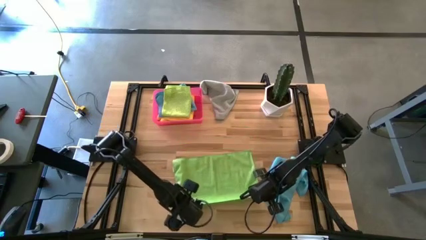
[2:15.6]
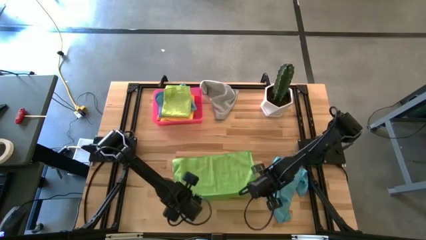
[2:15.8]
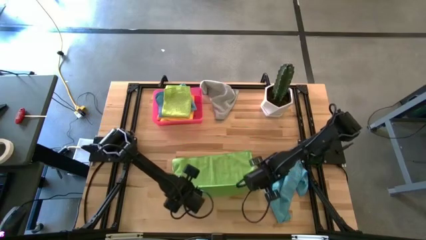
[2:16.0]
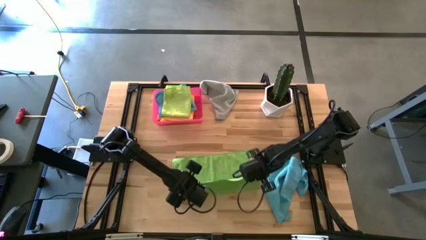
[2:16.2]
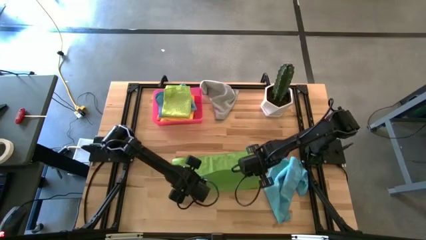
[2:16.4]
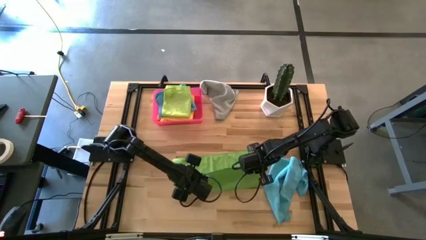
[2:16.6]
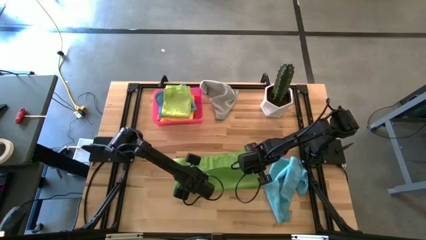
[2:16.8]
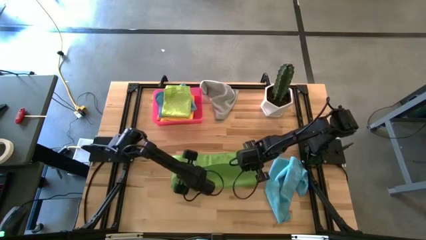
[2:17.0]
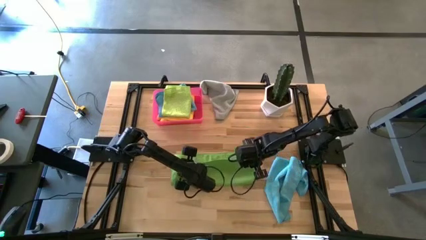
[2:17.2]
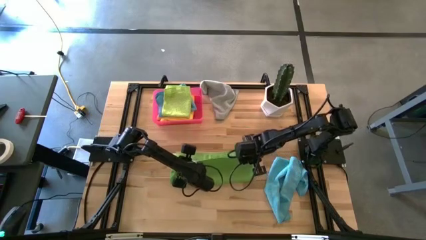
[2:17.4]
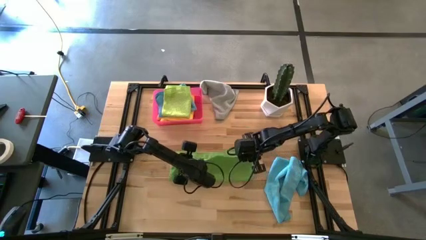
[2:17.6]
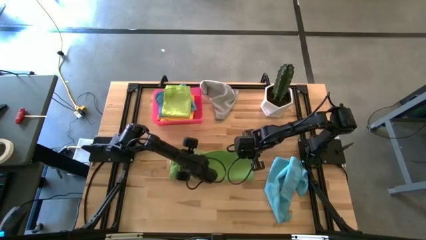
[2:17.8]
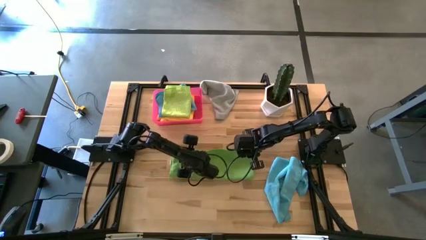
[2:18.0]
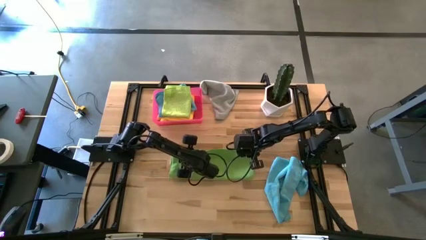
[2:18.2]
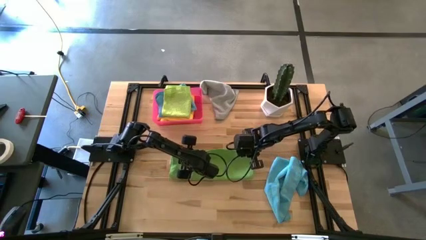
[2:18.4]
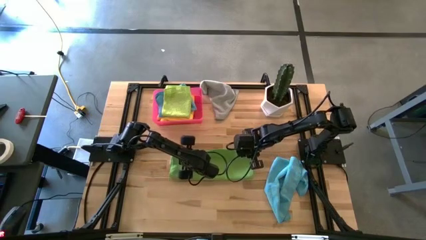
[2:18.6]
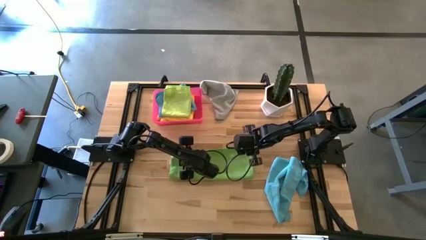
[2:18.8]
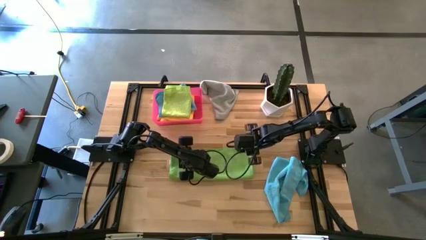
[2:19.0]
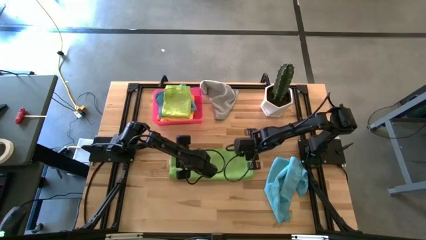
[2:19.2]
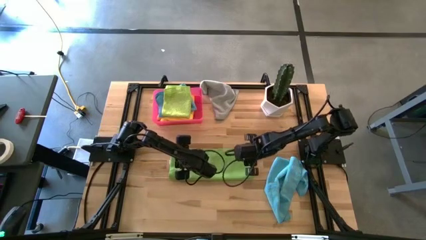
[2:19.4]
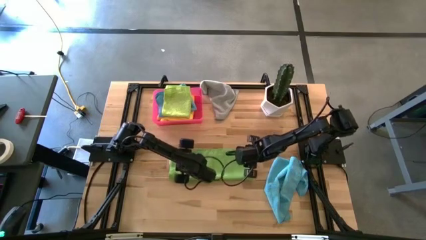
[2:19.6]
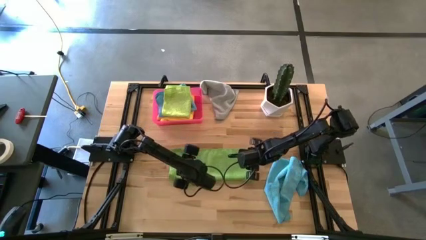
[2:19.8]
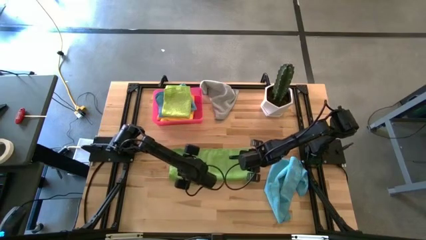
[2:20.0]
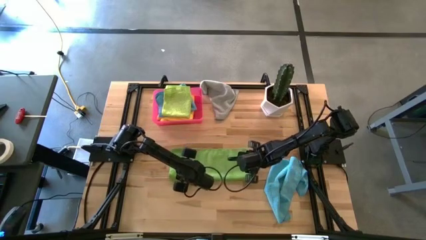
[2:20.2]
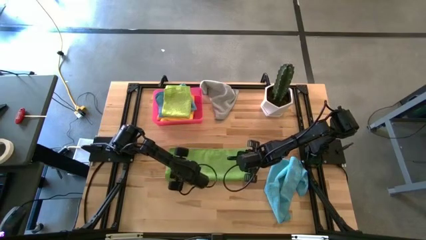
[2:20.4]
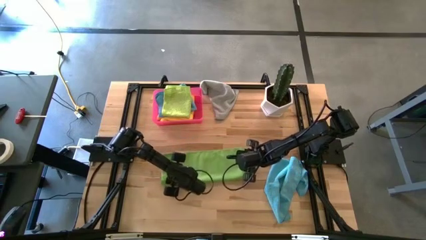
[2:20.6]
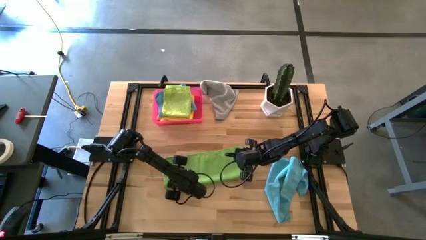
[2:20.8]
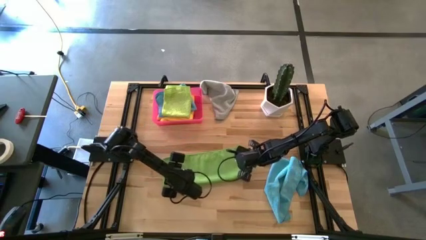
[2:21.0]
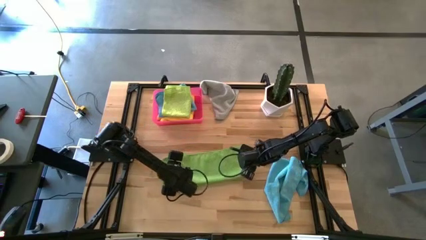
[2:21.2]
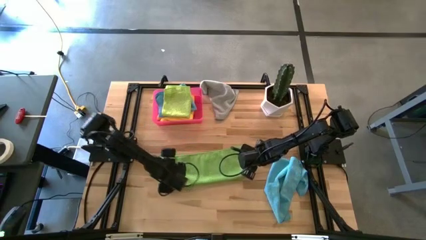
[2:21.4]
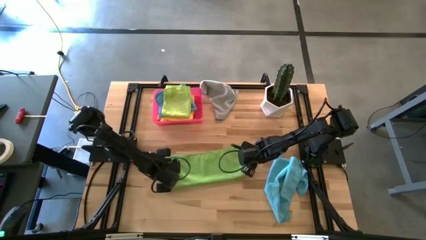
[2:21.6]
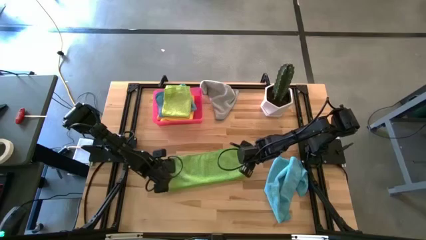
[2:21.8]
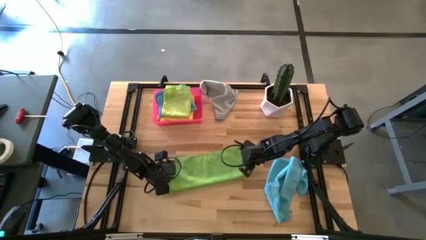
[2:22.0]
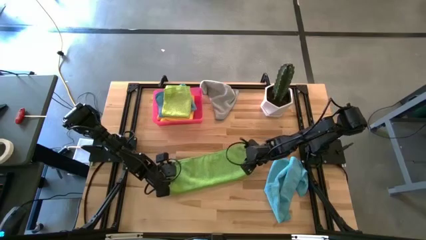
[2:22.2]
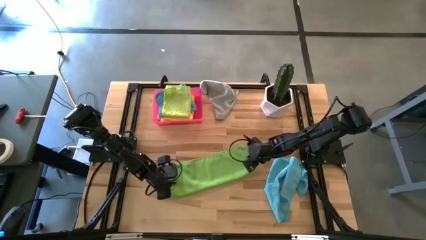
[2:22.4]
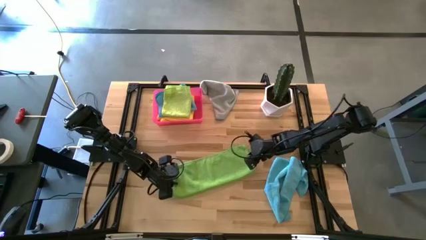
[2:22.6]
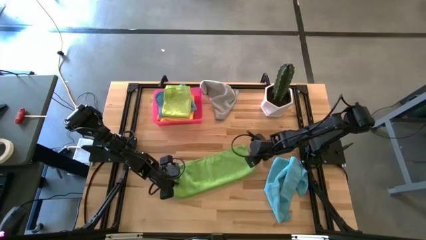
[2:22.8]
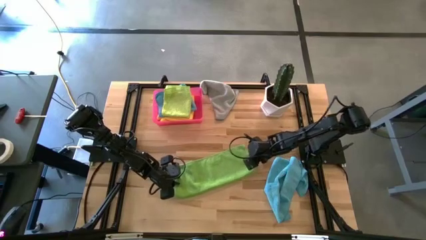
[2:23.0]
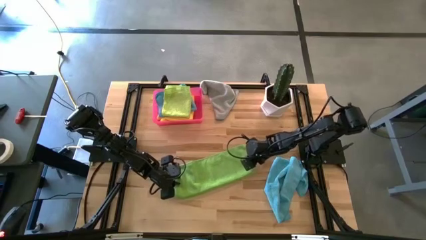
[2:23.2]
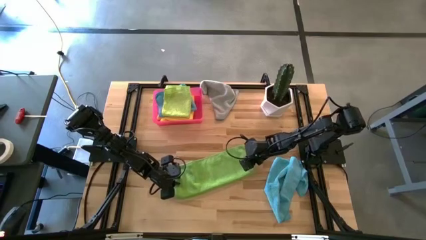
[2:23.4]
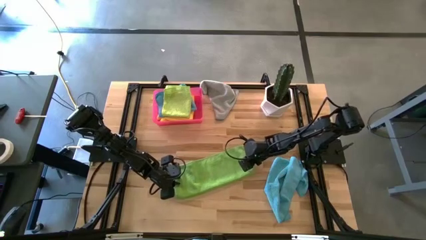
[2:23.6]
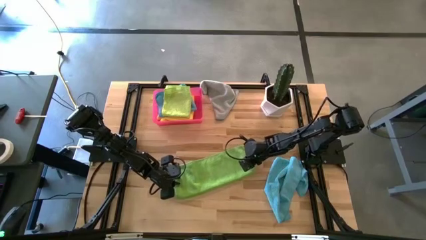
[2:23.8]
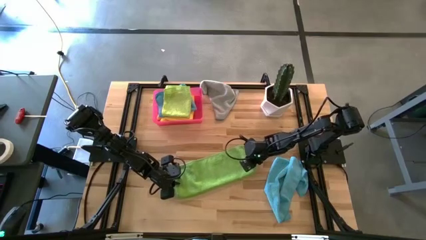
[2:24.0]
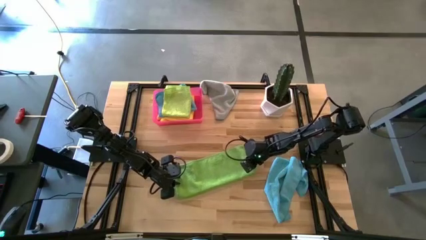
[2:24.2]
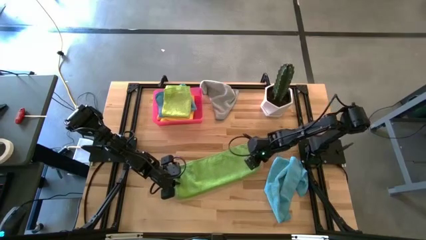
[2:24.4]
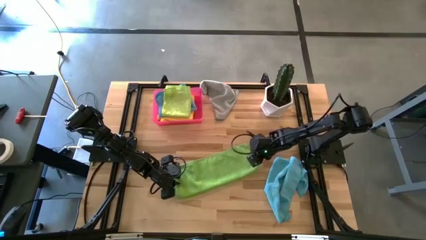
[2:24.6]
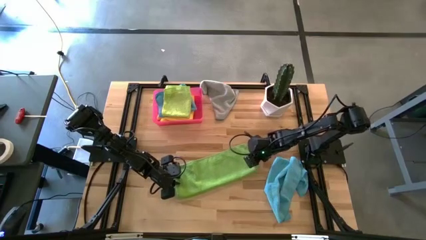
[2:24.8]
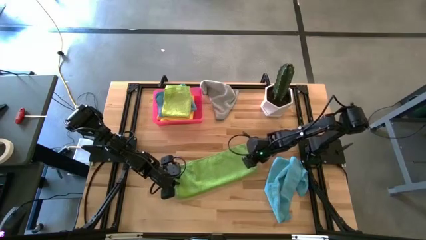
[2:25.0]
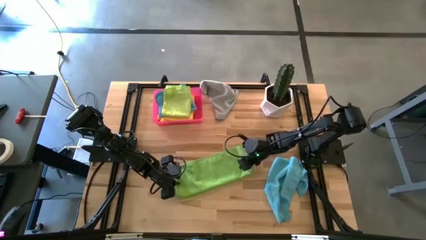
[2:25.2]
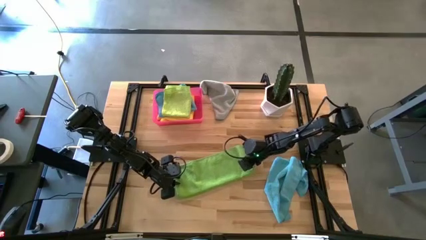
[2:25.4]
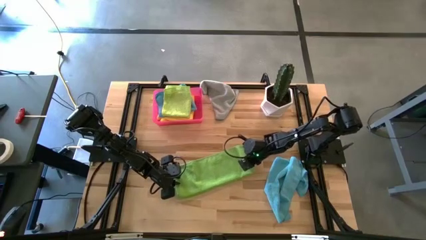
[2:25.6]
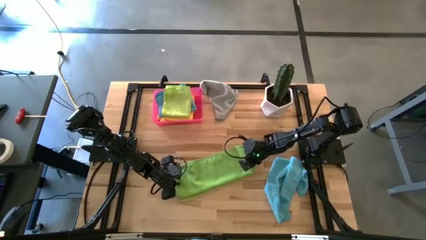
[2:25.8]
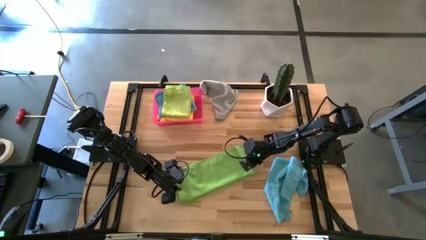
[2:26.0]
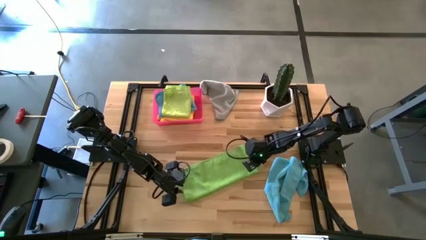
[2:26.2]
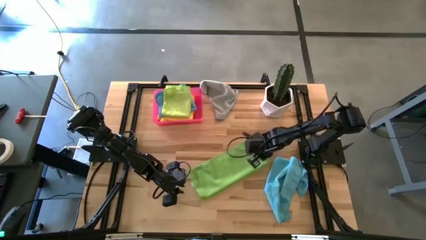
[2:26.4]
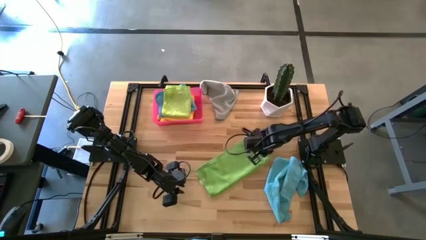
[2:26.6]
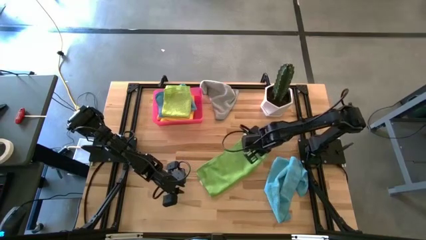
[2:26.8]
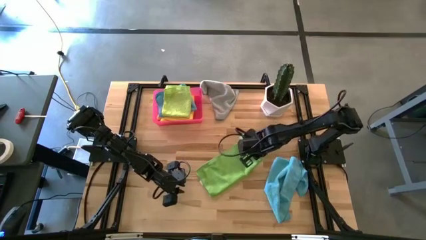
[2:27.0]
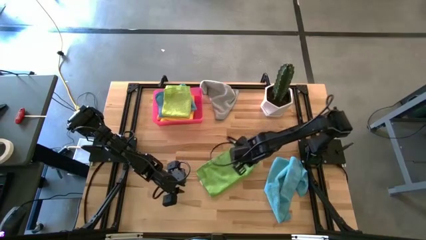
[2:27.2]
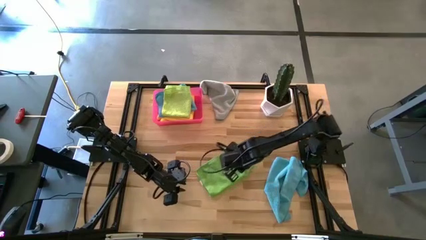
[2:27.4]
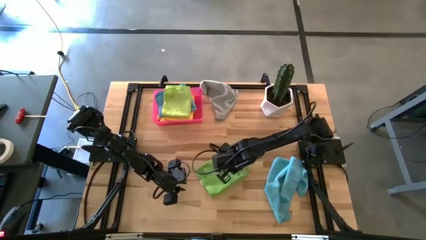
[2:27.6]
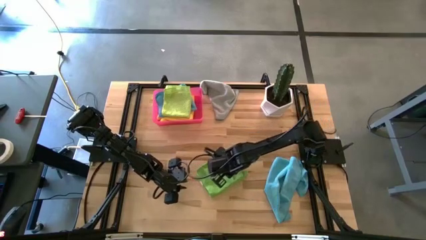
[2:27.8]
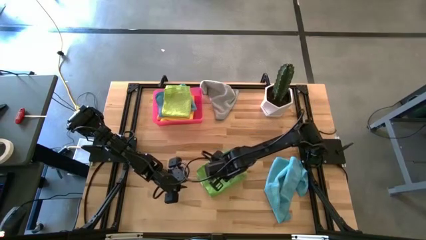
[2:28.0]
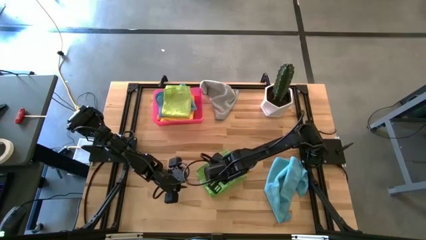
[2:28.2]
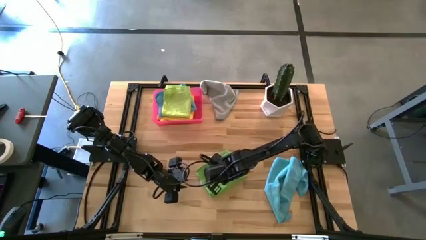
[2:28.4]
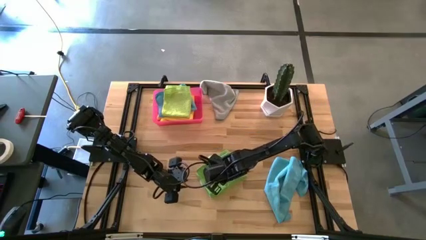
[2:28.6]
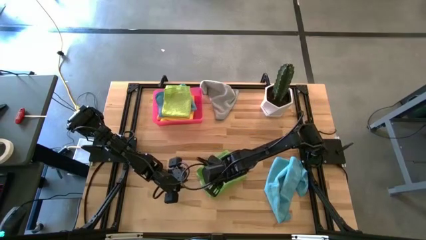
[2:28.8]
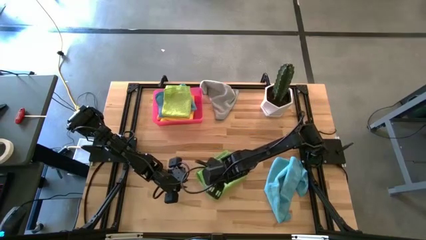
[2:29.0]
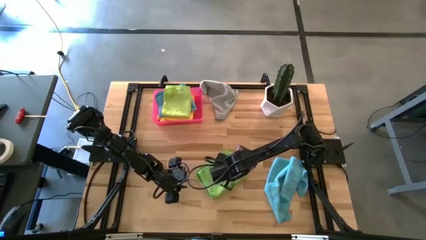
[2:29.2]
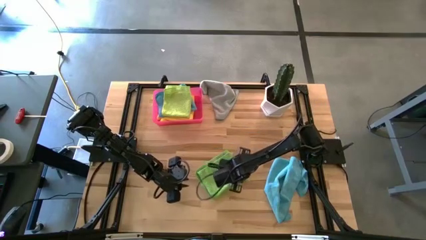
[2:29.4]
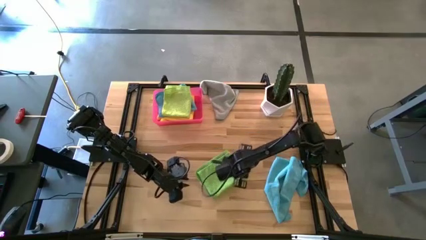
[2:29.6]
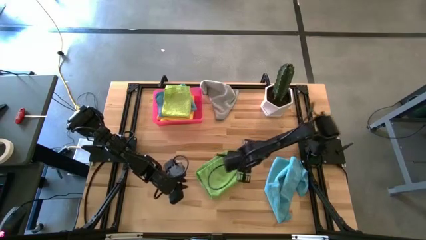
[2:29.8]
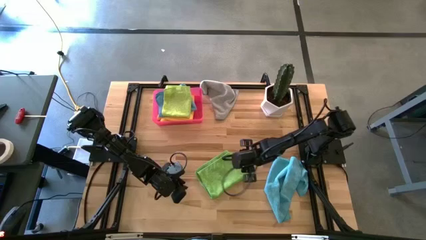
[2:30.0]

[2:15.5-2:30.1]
Task: Fold microfiber towels
Fold the green towel on the table

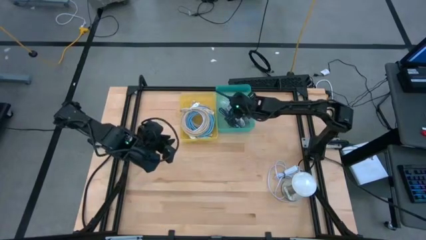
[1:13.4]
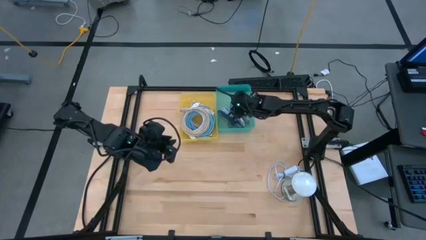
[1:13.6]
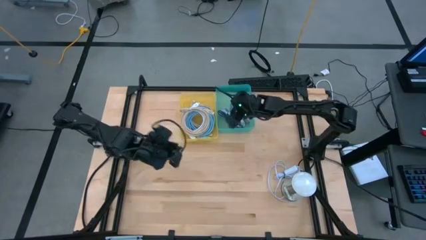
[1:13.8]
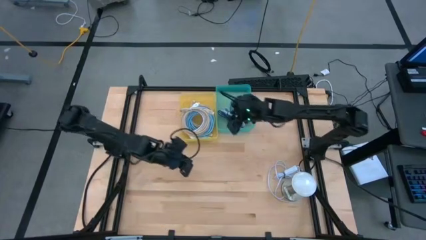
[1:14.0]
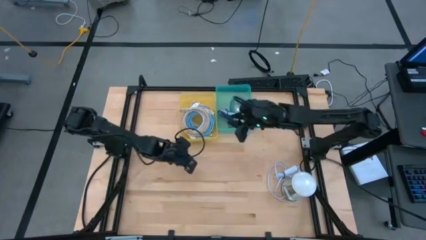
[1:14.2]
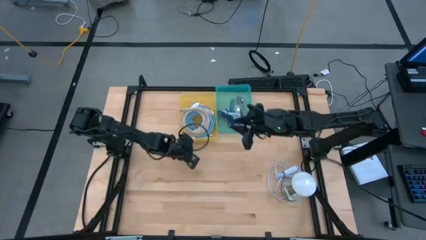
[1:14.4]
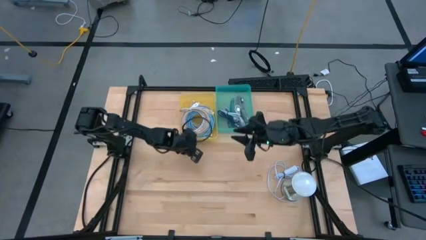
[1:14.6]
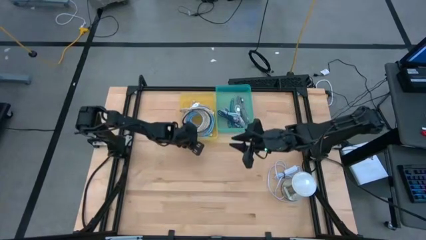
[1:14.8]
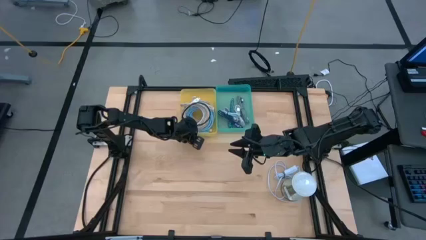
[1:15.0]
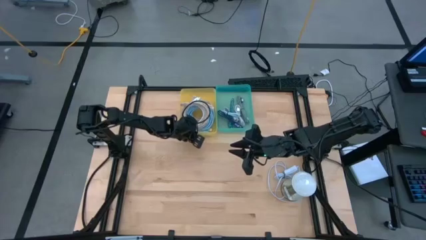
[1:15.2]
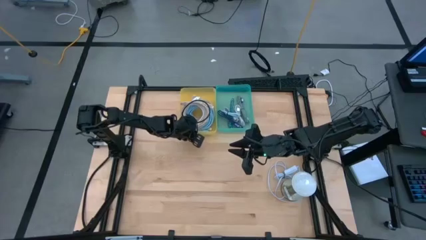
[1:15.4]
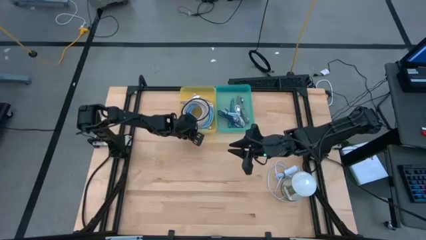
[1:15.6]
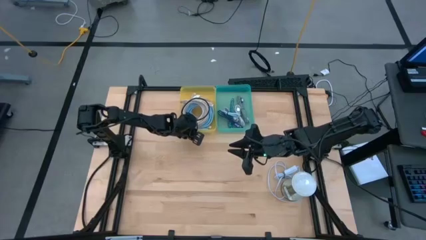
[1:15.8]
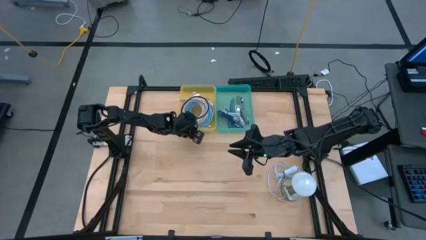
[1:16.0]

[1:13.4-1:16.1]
Task: Pick & Place USB Port
Adjust the yellow bin
